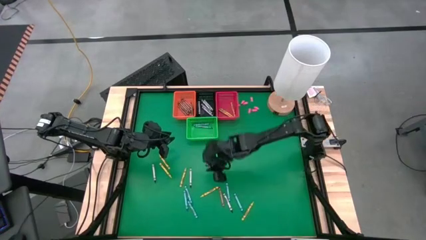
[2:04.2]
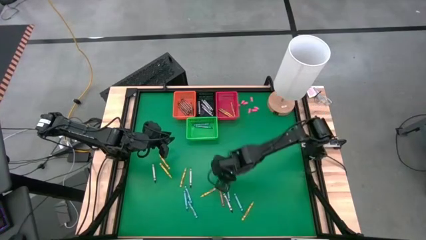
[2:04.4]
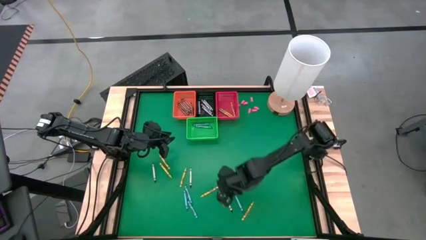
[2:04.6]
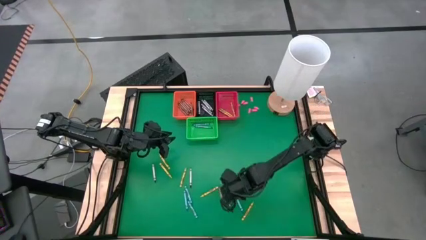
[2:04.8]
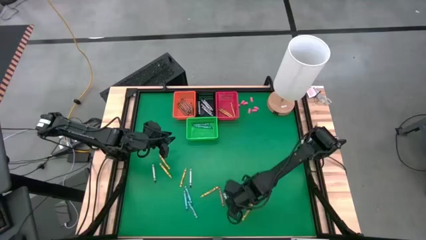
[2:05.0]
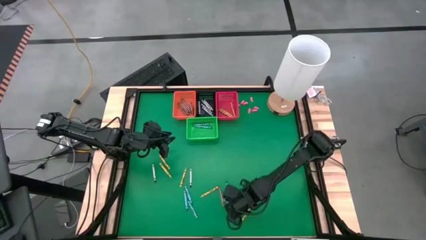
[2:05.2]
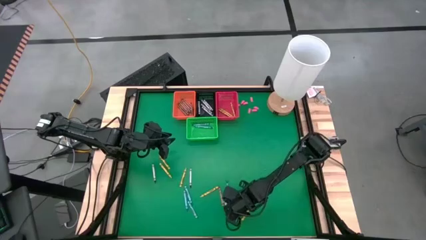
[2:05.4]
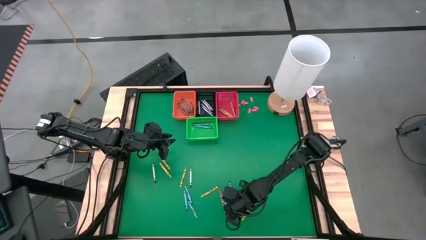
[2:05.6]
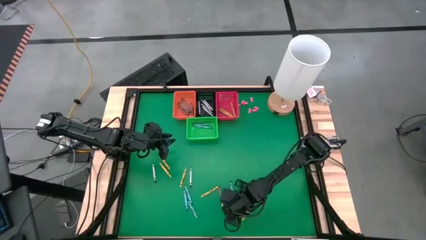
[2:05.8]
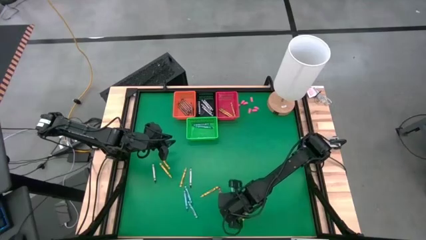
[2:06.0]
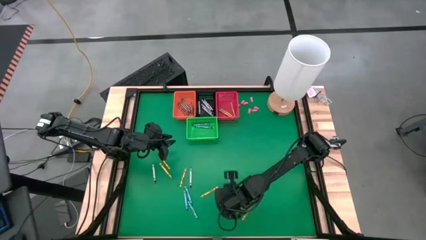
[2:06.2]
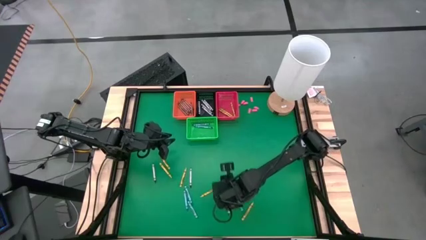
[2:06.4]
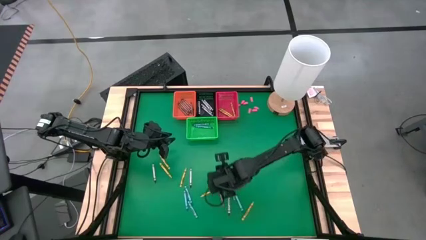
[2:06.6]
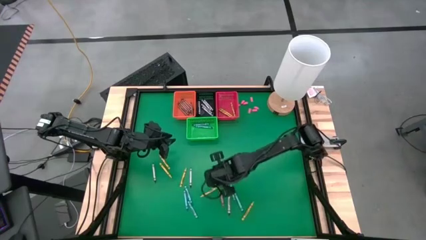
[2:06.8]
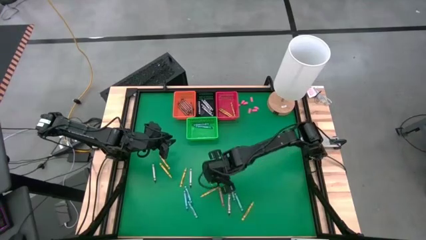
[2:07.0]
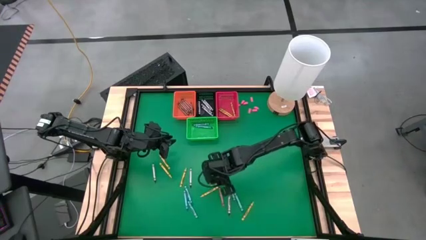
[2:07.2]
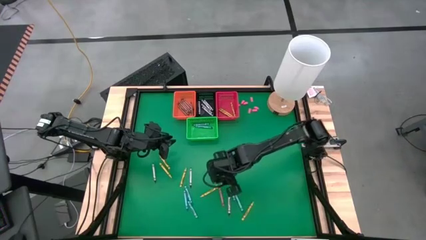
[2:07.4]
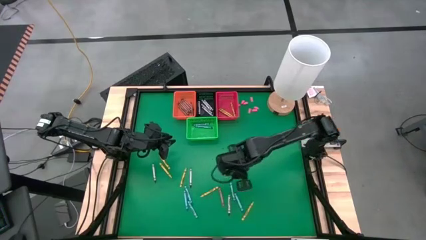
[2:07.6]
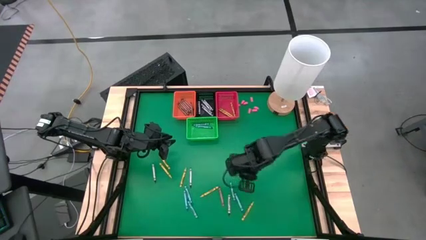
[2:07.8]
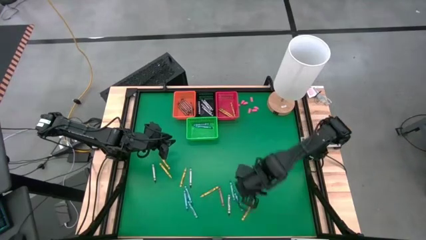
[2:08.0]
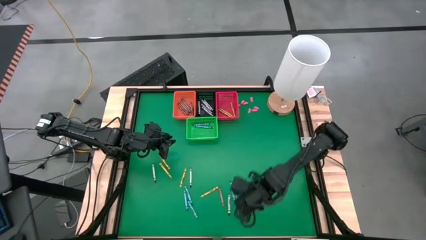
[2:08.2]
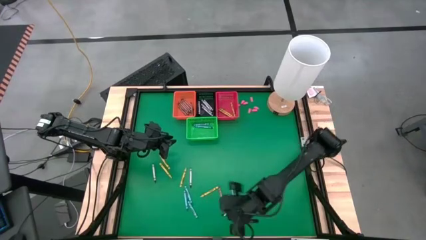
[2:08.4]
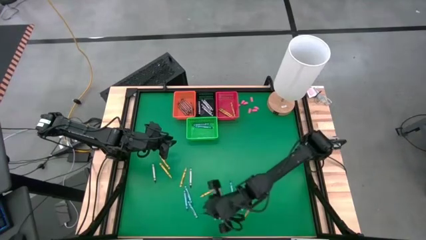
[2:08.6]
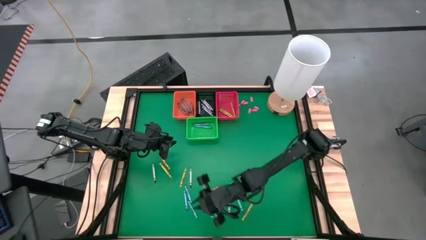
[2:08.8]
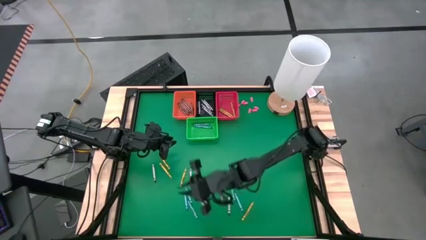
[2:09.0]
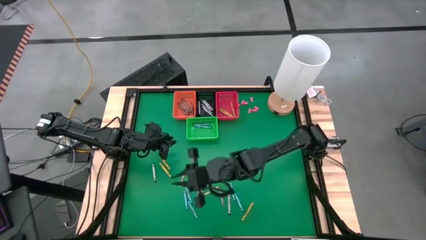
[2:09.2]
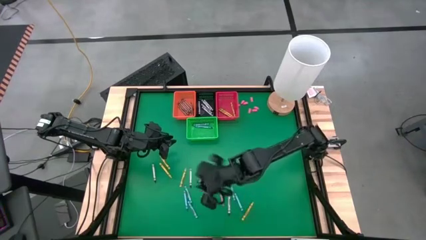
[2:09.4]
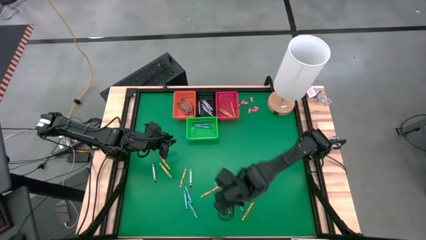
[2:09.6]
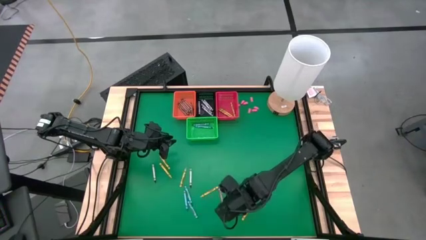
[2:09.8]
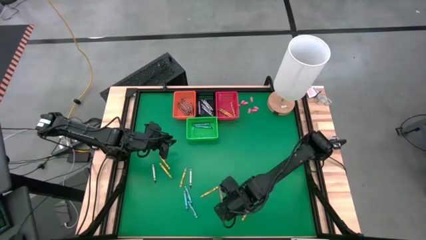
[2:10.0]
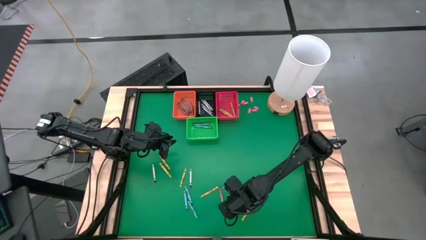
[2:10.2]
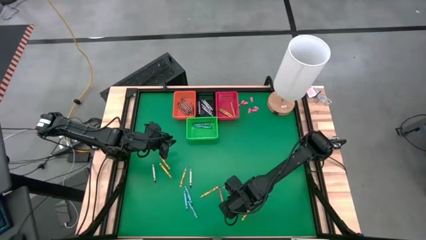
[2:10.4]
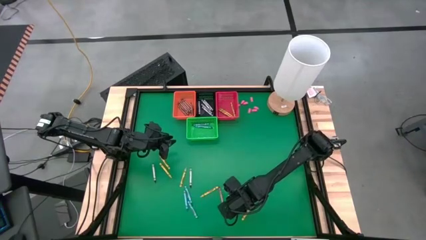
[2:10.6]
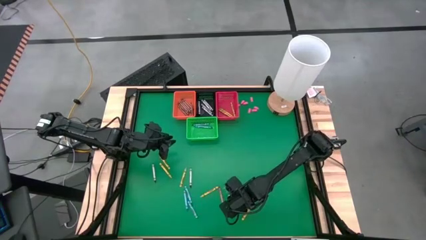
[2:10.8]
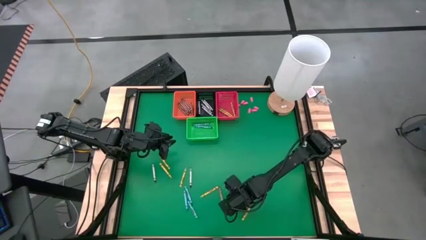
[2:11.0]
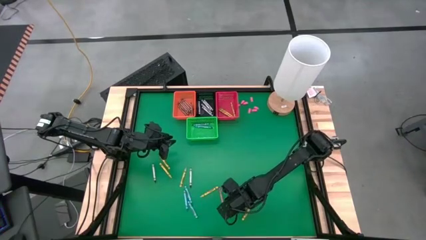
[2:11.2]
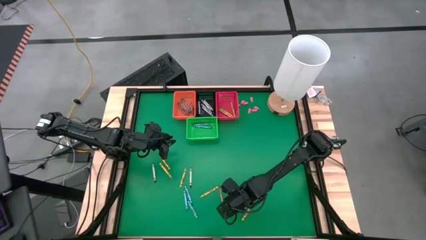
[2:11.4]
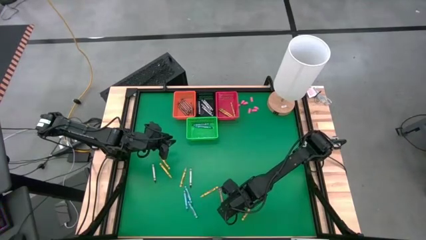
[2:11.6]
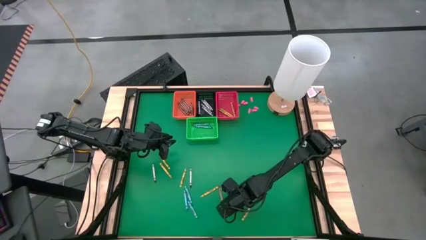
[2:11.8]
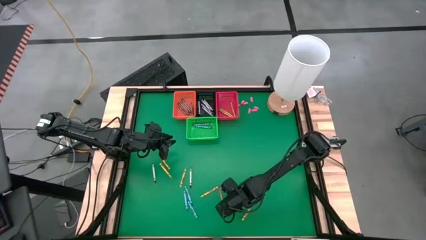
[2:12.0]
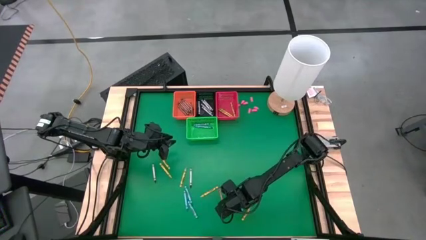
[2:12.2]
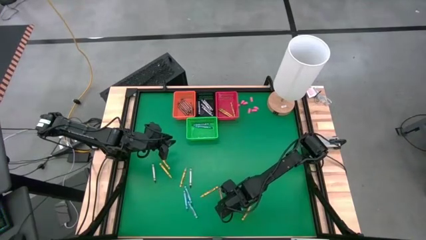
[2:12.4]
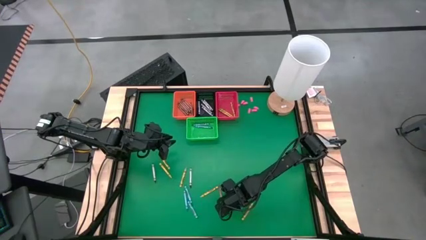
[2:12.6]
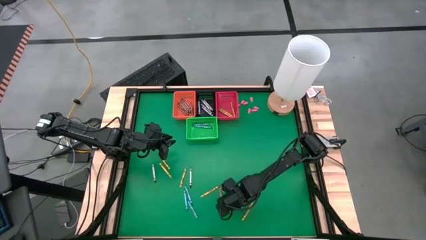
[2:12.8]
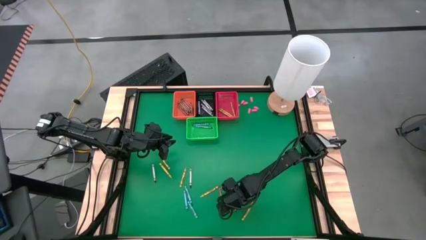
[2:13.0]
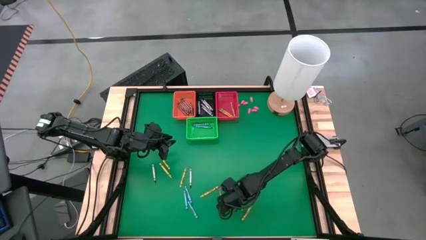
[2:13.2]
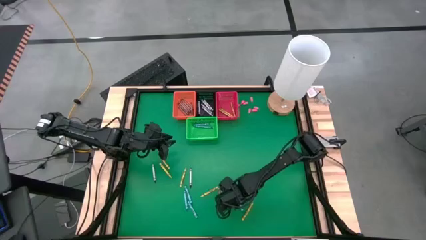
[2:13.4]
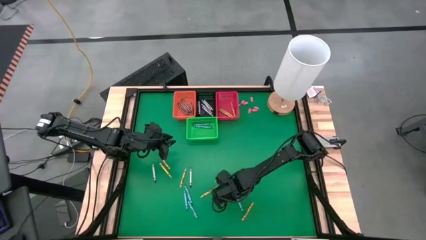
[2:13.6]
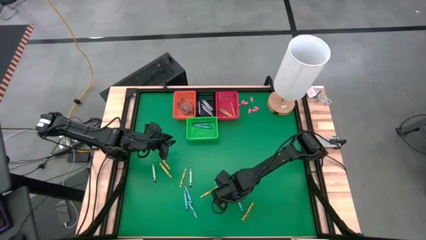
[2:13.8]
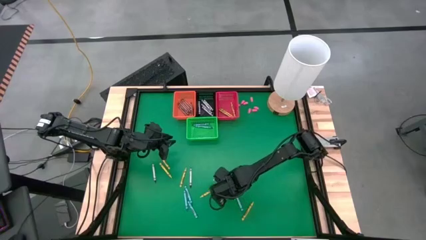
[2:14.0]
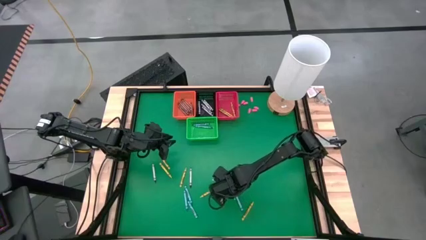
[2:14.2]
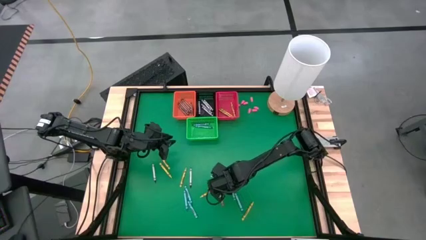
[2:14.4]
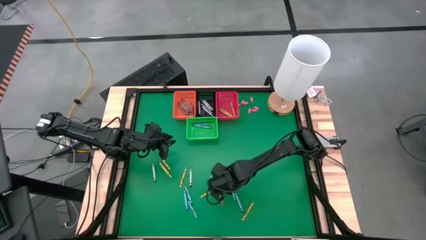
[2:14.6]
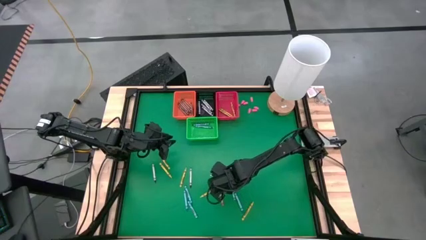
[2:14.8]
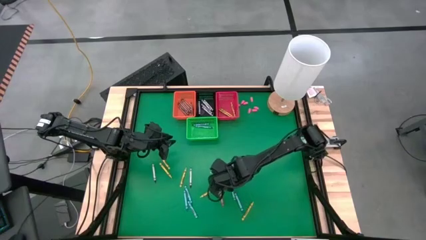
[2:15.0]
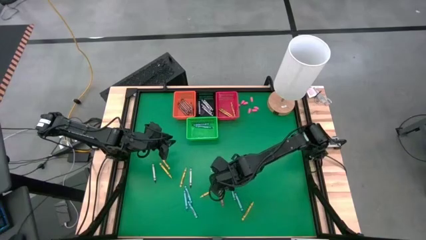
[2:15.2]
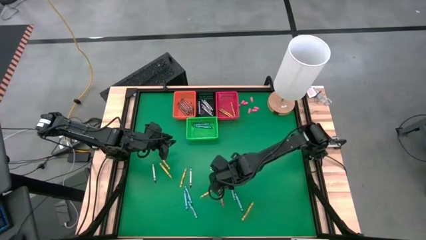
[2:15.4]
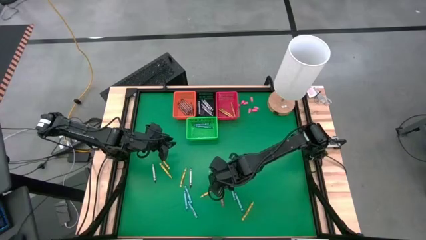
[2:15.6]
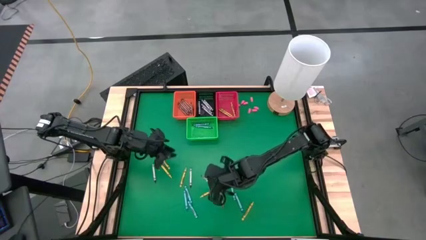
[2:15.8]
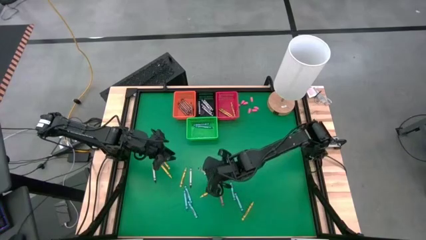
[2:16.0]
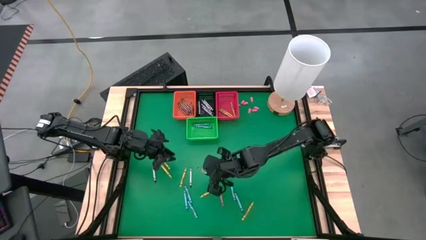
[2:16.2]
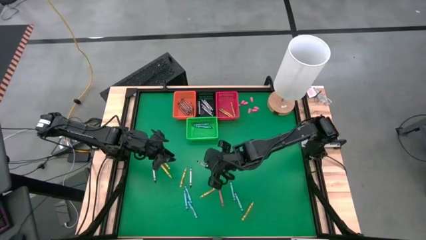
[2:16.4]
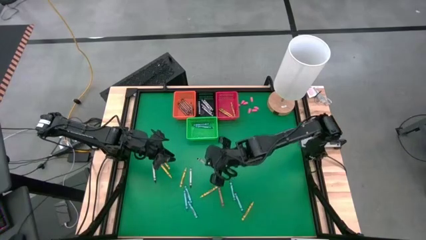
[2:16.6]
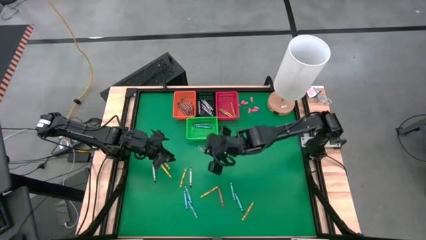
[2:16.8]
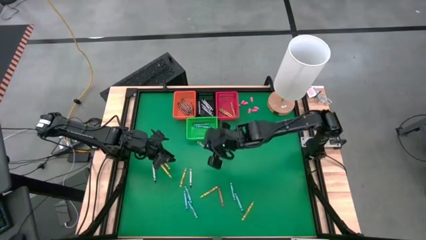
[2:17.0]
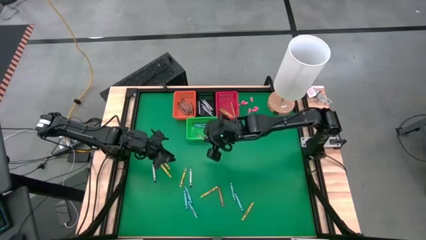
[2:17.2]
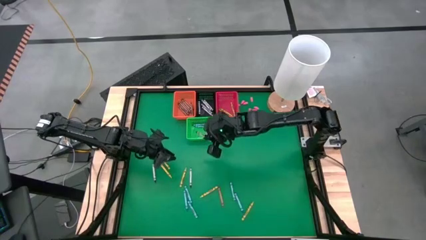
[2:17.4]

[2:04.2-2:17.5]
Task: Sort crayons
Put a black crayon in the black basket
